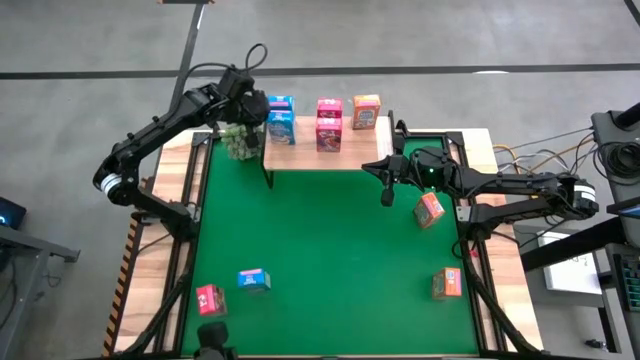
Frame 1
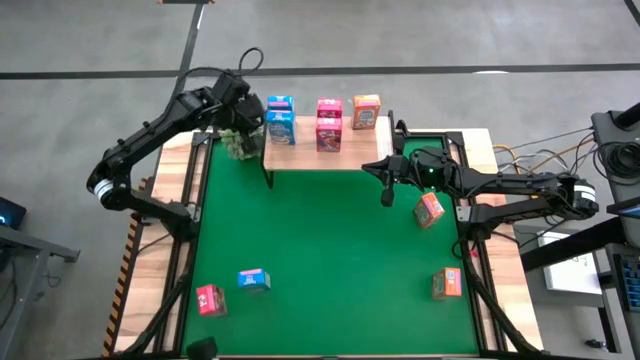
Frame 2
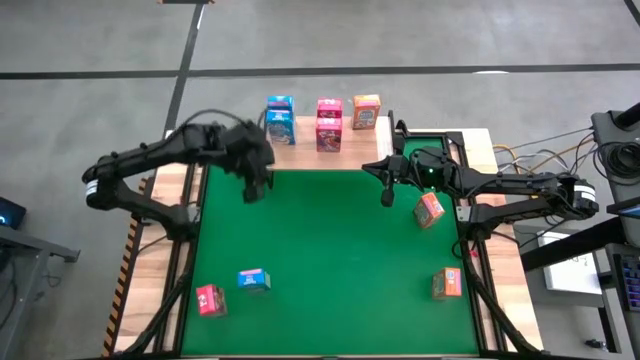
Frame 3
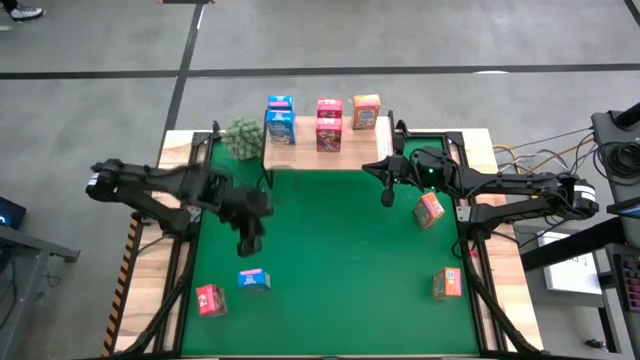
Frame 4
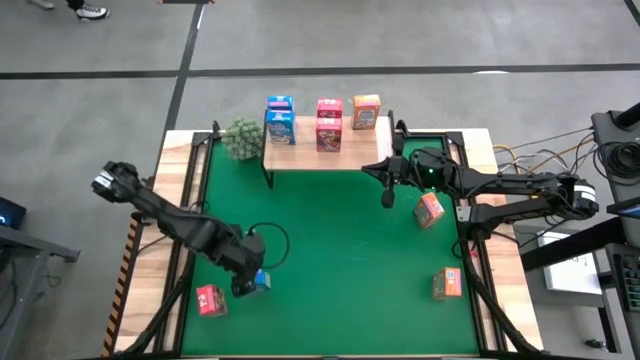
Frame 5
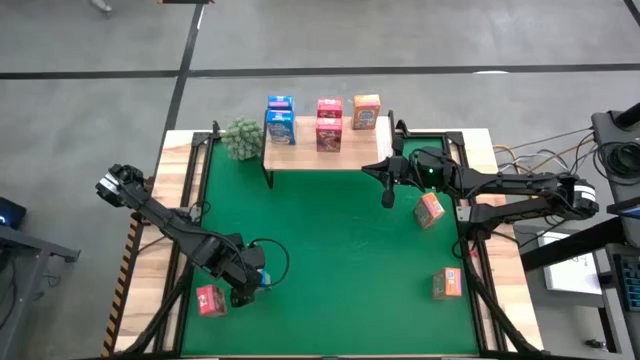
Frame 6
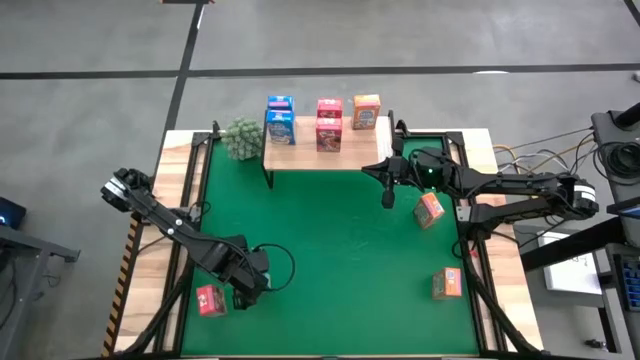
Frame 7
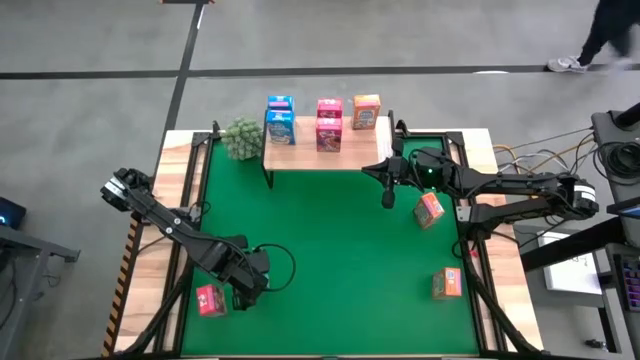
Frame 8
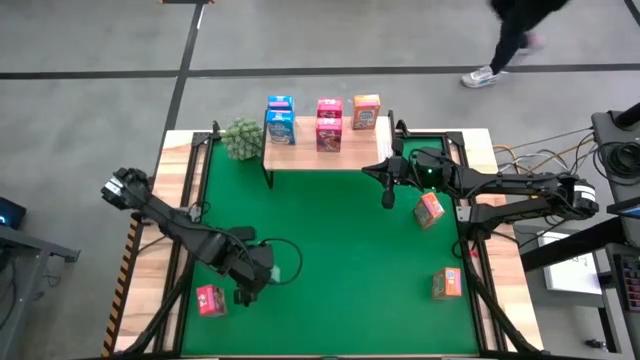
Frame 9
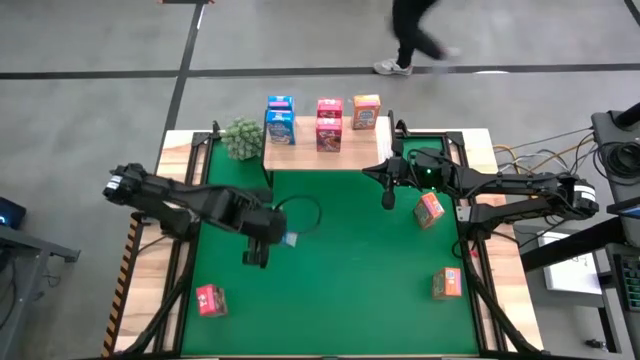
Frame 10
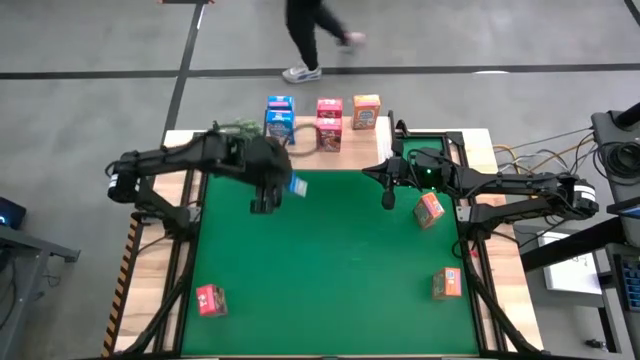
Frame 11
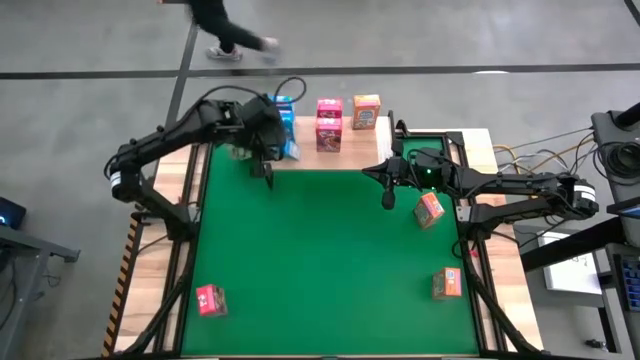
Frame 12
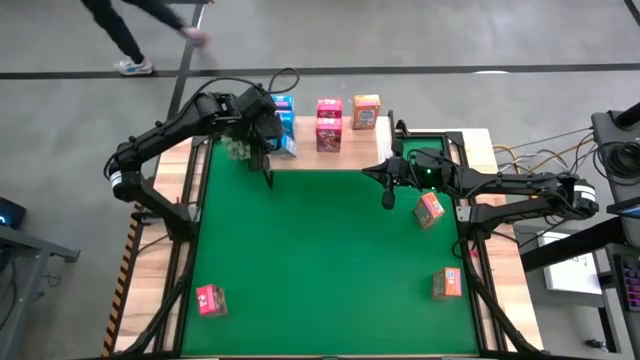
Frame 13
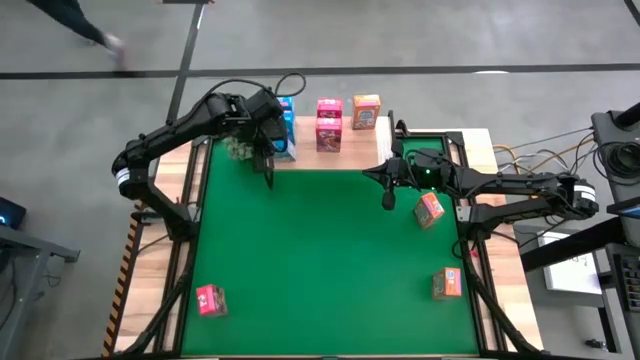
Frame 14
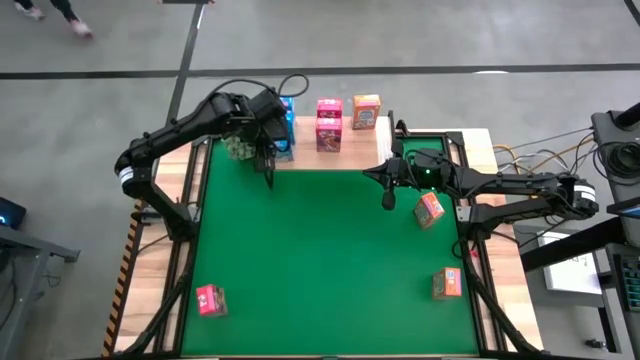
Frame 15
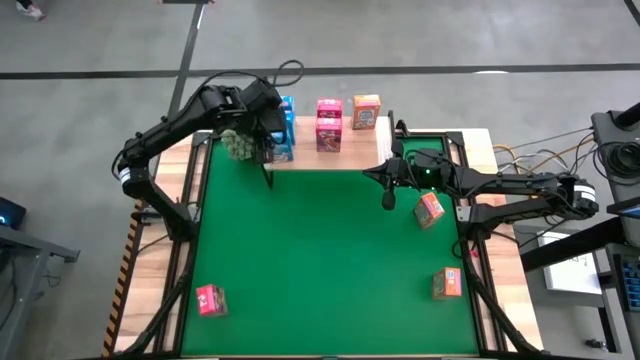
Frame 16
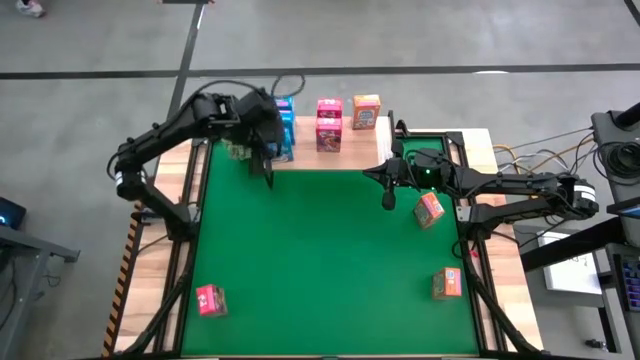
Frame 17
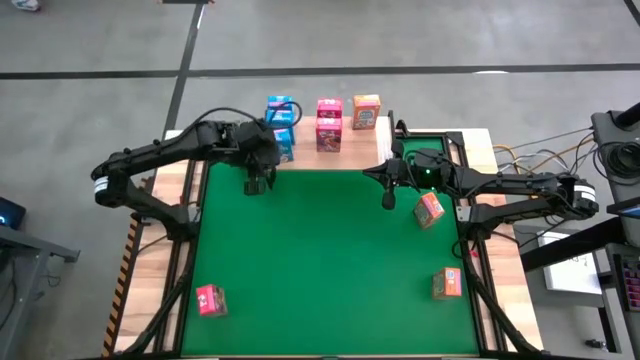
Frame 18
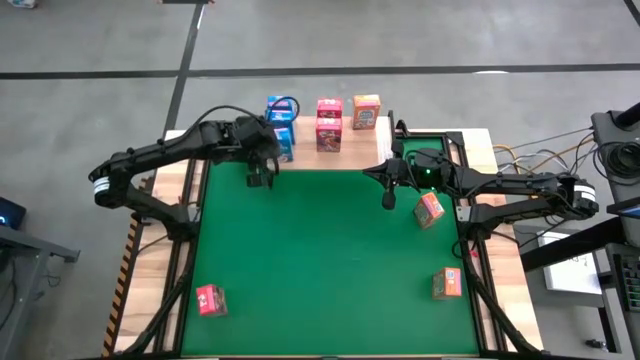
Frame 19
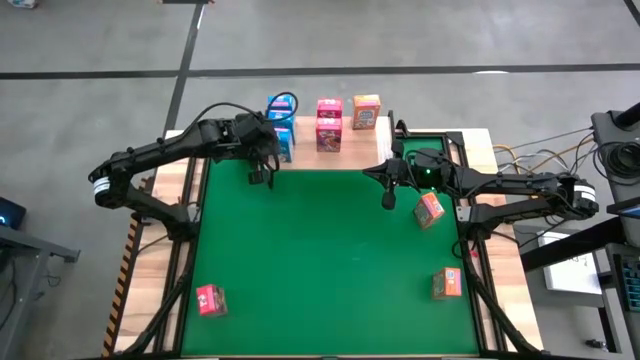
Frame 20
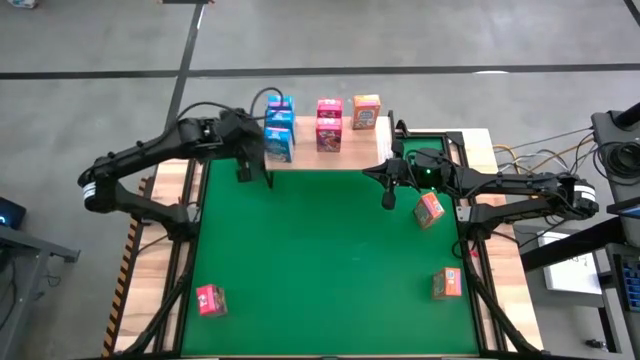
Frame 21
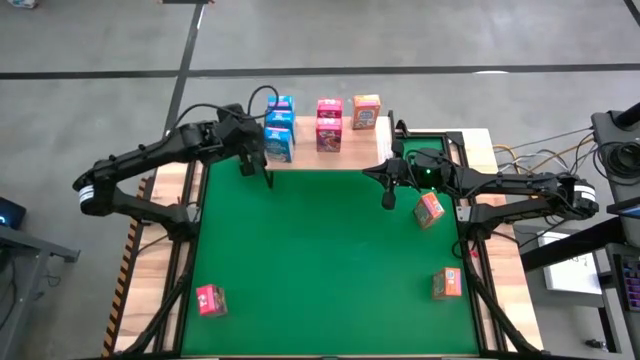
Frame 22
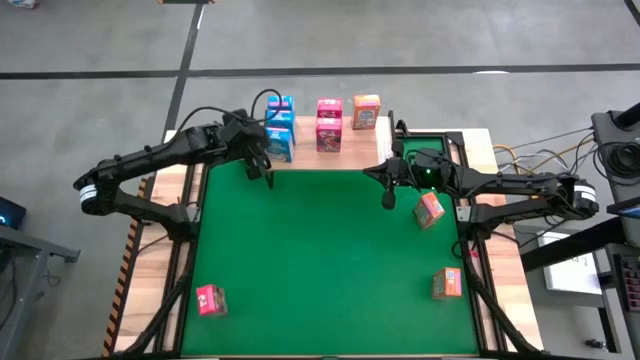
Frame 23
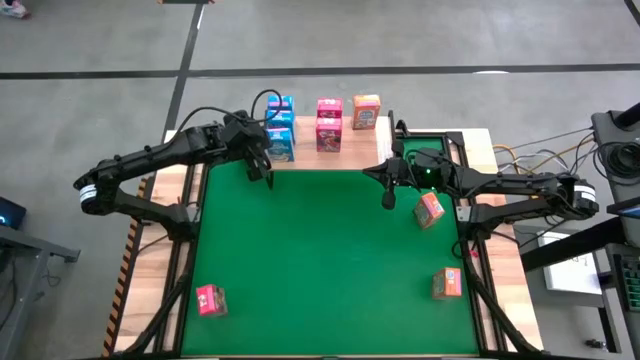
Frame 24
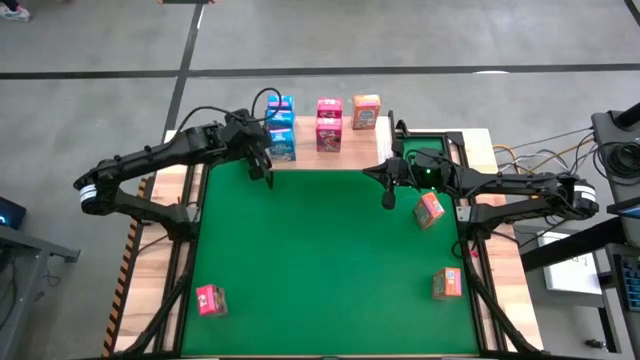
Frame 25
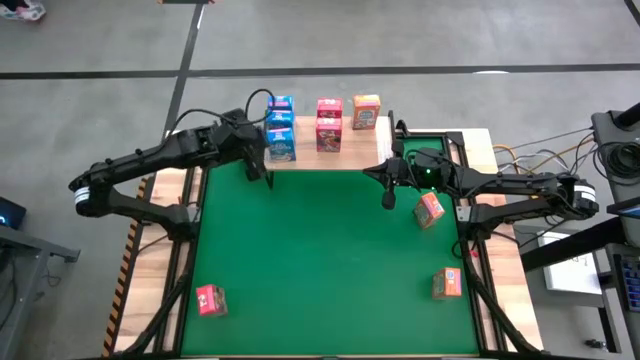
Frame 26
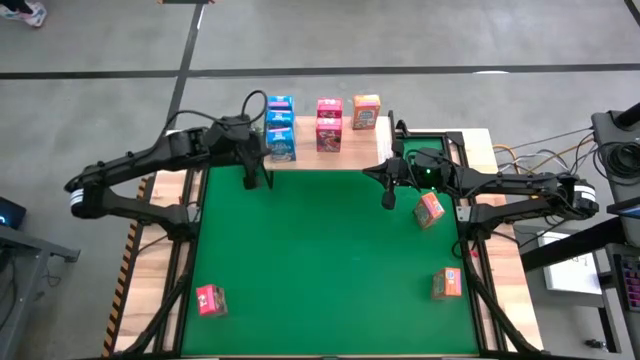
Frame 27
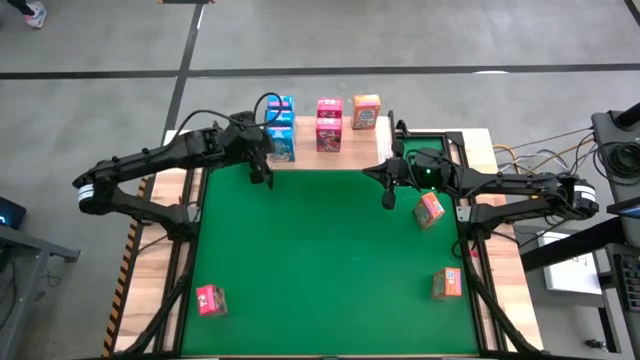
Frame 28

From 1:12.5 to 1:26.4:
Task: Stack cereal on shelf
Put the blue cereal box on the shelf aligned with the other blue cereal boxes

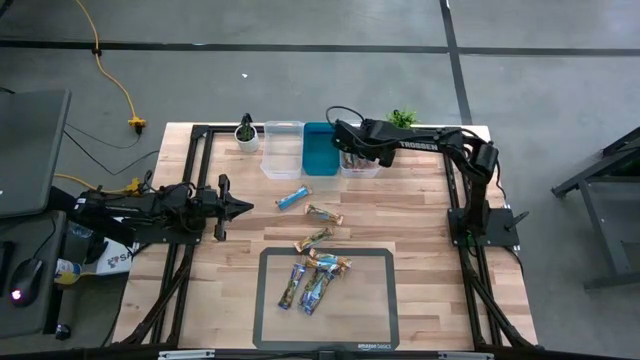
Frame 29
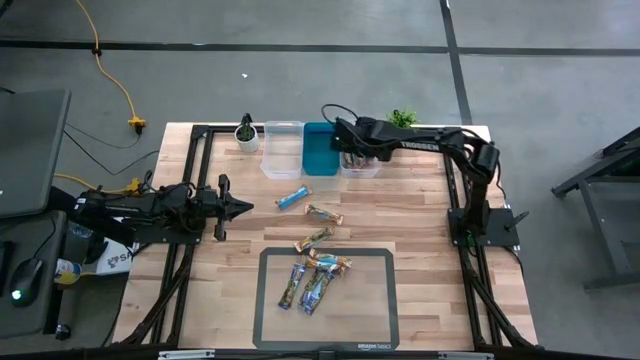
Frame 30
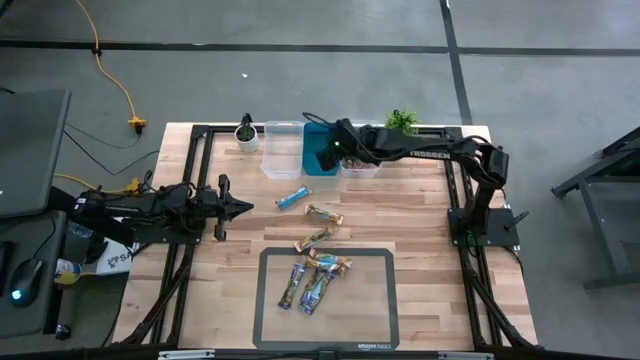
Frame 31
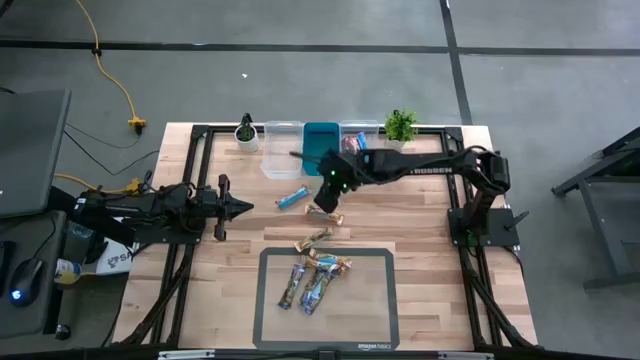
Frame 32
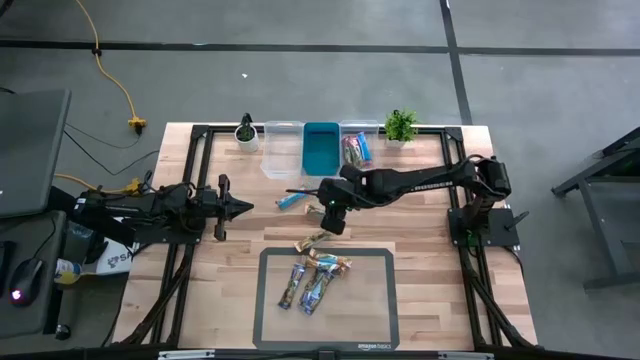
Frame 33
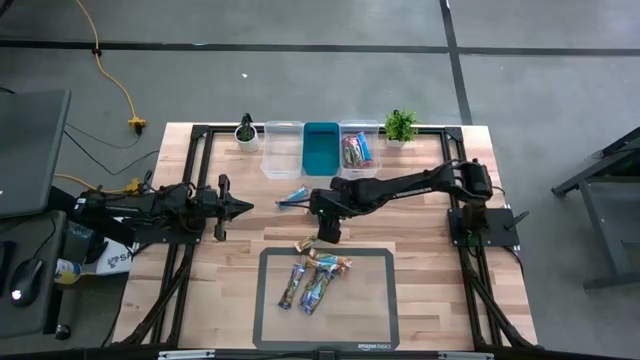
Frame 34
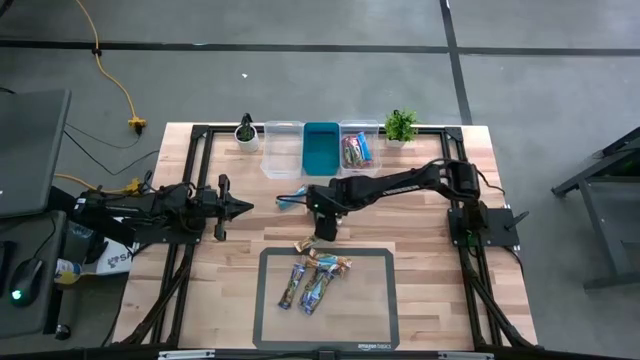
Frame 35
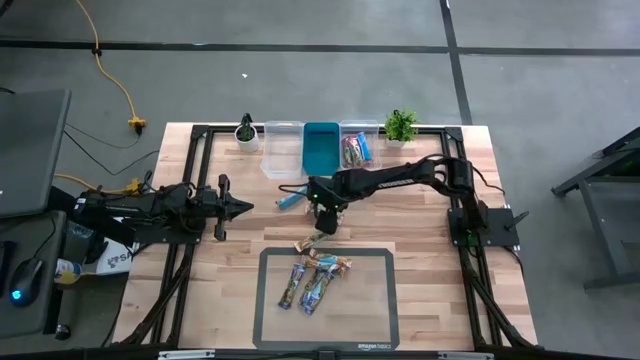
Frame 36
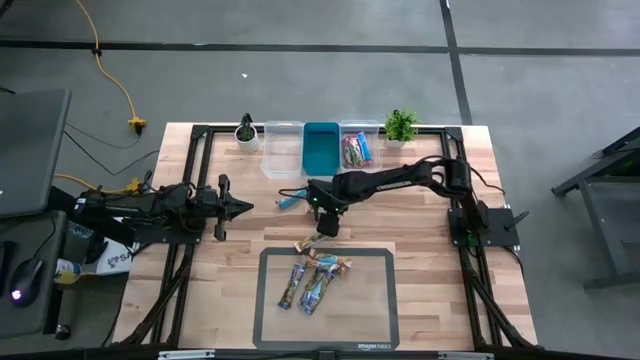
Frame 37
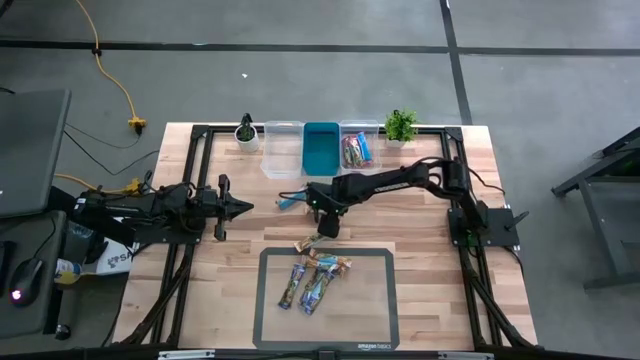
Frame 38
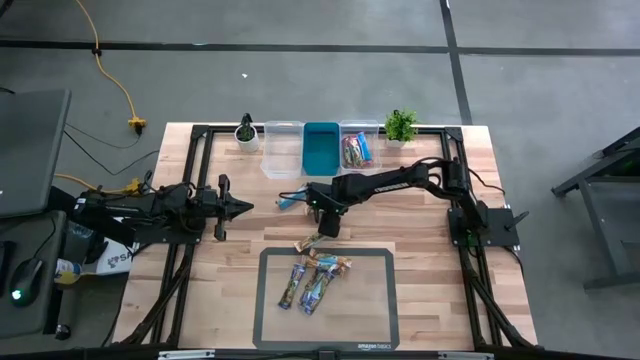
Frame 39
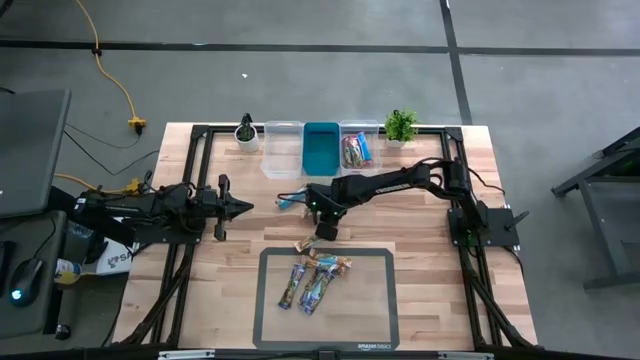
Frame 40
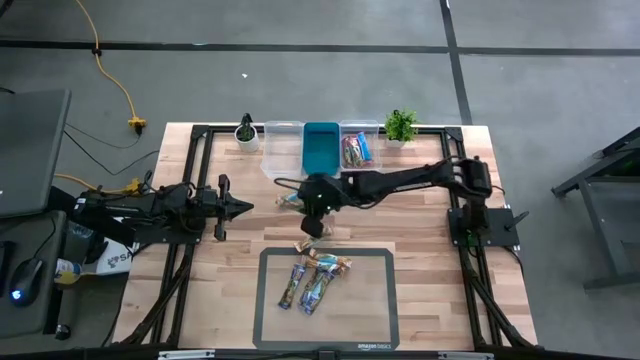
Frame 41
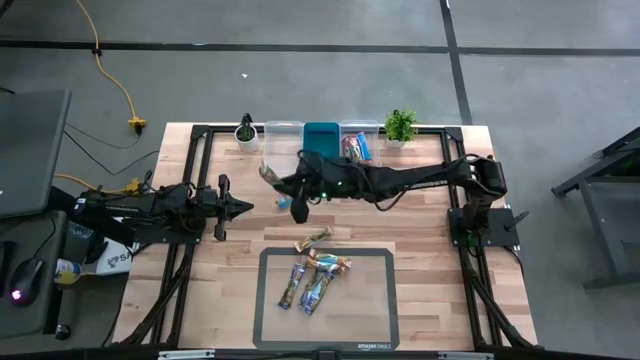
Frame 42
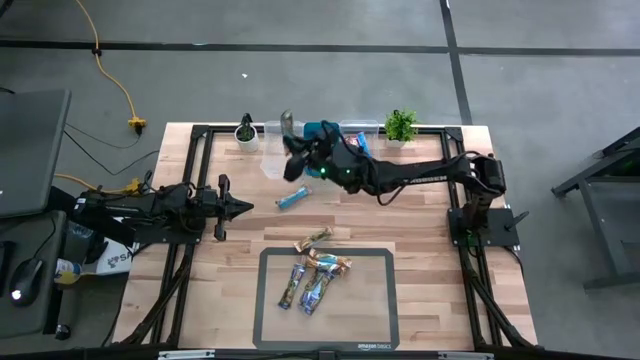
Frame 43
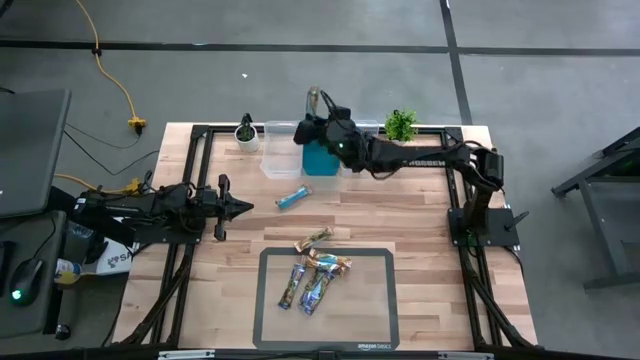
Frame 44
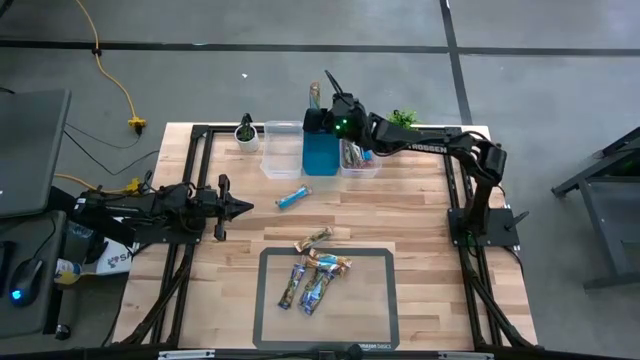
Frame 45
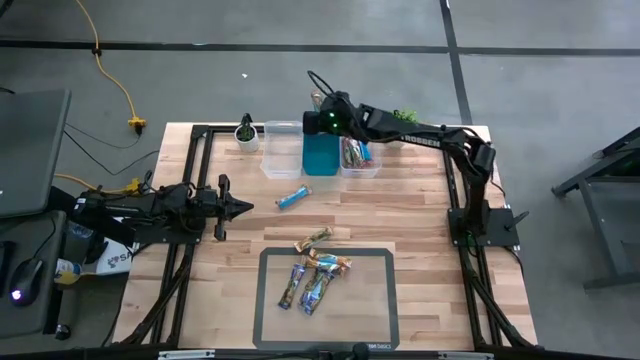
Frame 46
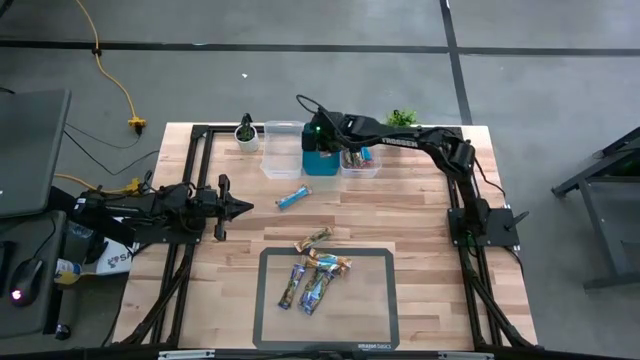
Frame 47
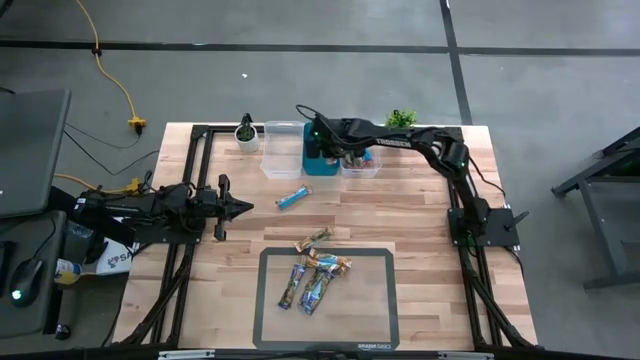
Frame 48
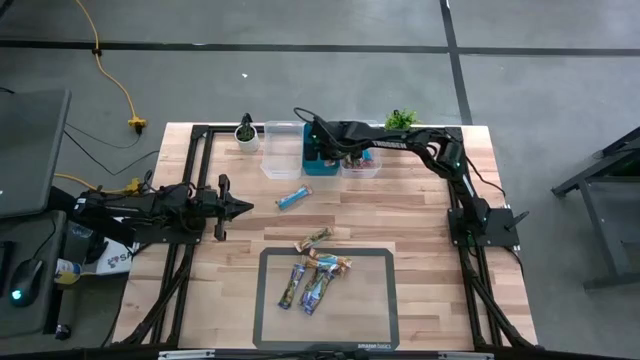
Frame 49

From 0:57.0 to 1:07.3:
Task: Pick and place Granola Bars by type
Put the yellow granola bar into the blue bin
